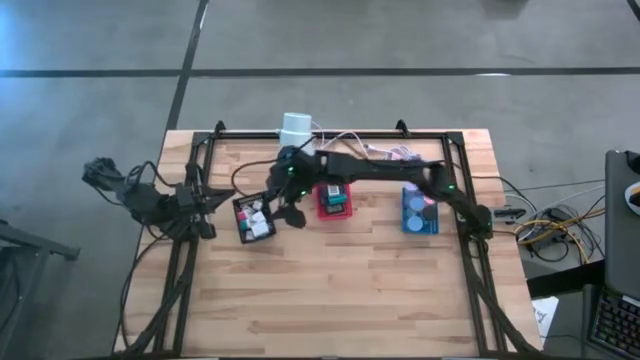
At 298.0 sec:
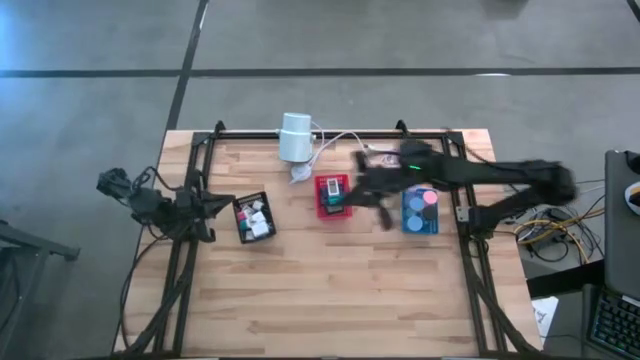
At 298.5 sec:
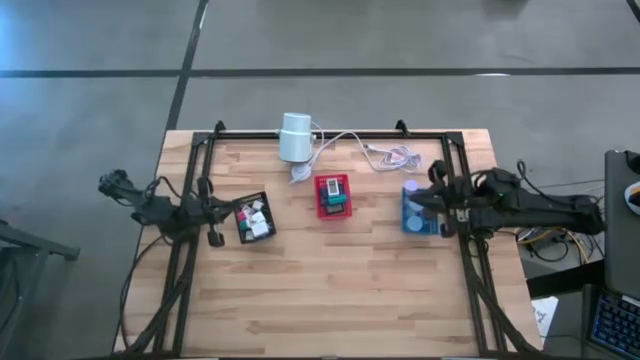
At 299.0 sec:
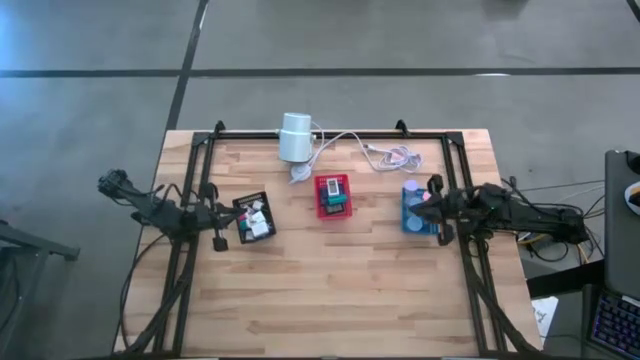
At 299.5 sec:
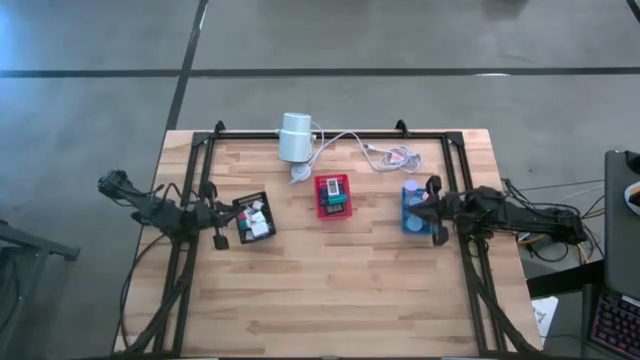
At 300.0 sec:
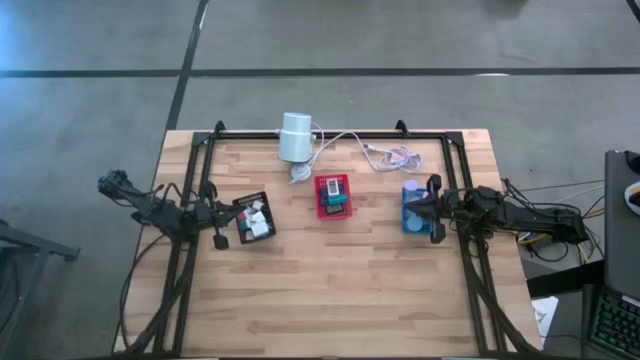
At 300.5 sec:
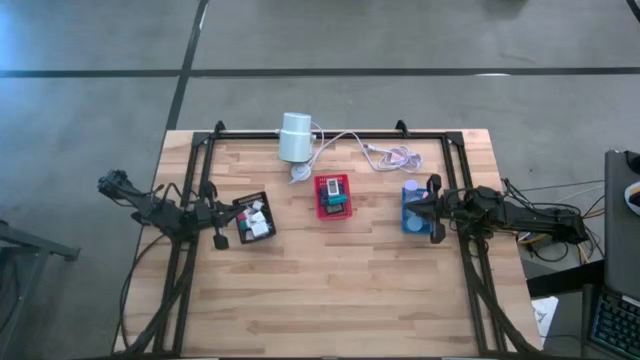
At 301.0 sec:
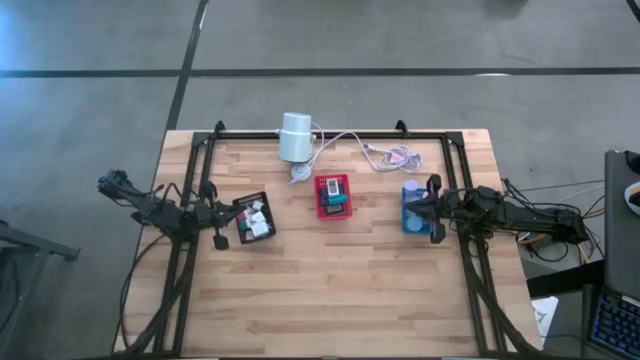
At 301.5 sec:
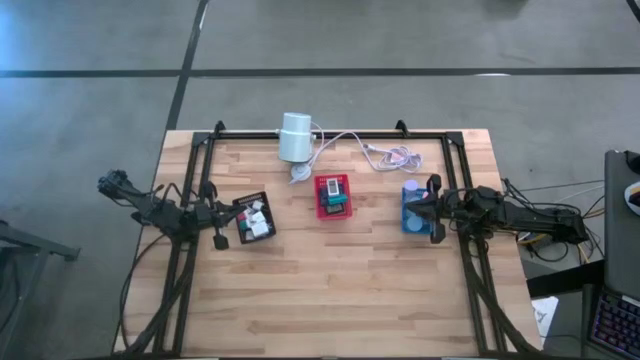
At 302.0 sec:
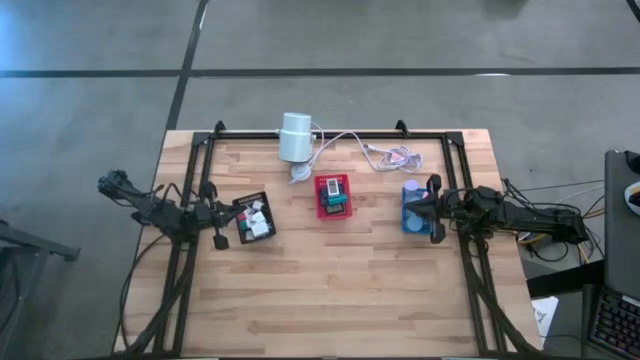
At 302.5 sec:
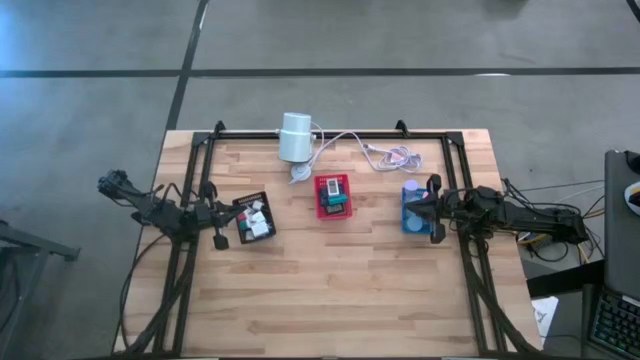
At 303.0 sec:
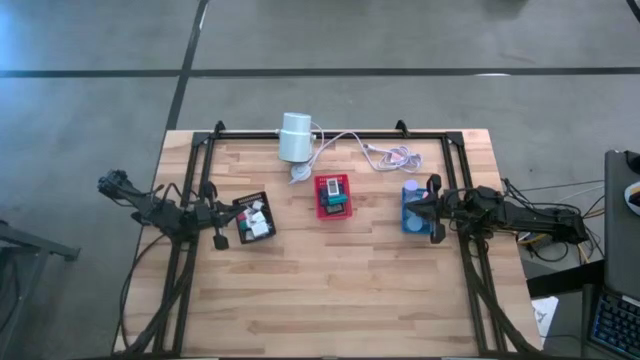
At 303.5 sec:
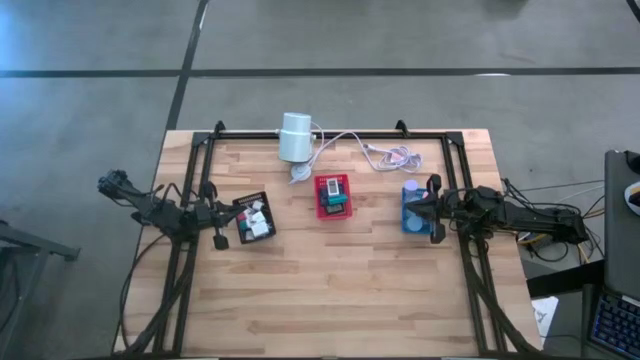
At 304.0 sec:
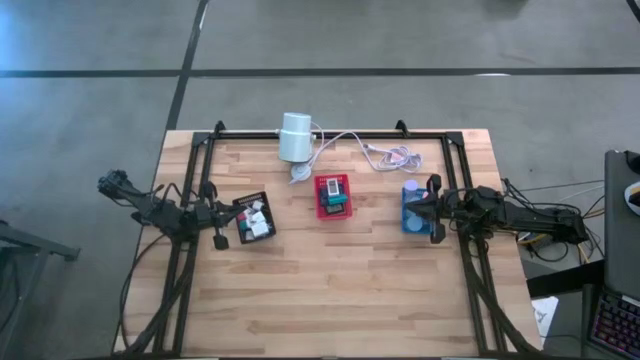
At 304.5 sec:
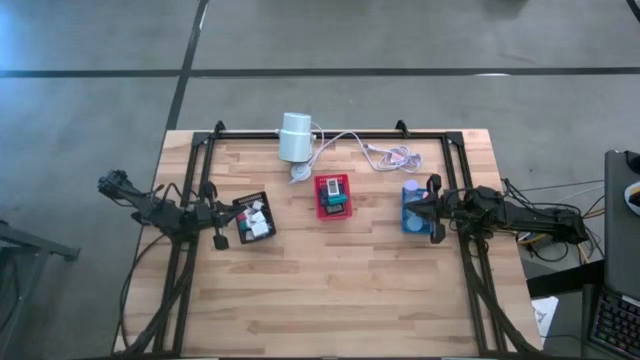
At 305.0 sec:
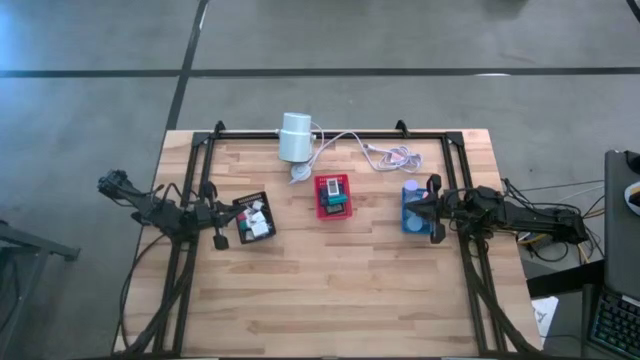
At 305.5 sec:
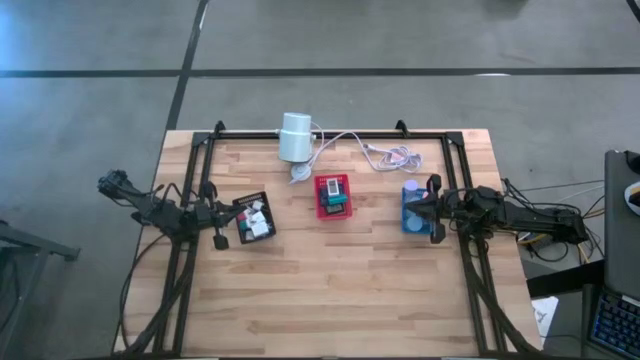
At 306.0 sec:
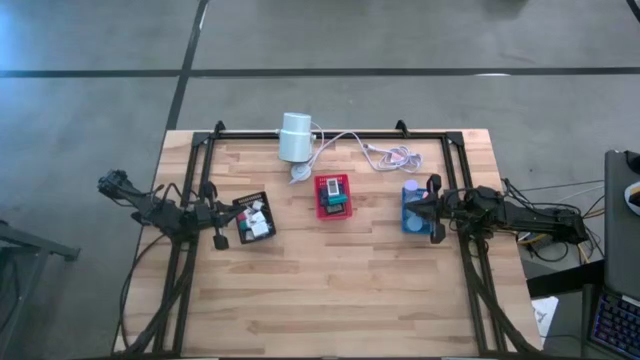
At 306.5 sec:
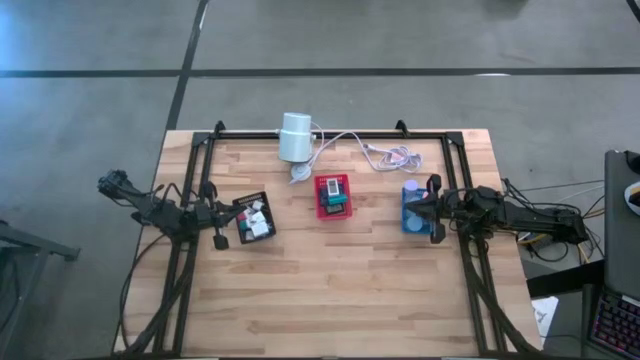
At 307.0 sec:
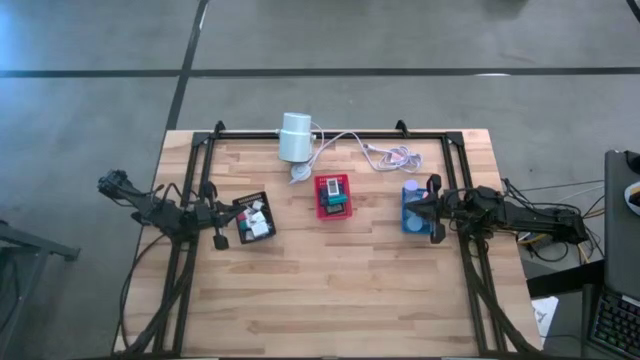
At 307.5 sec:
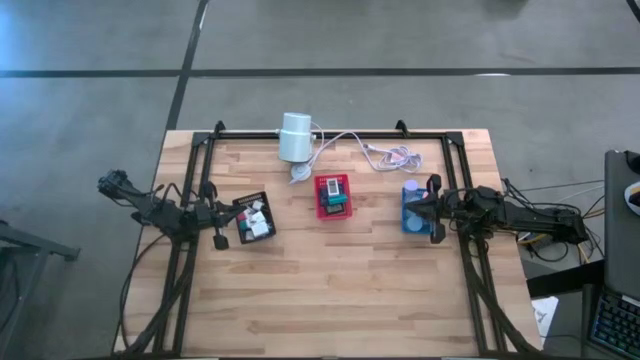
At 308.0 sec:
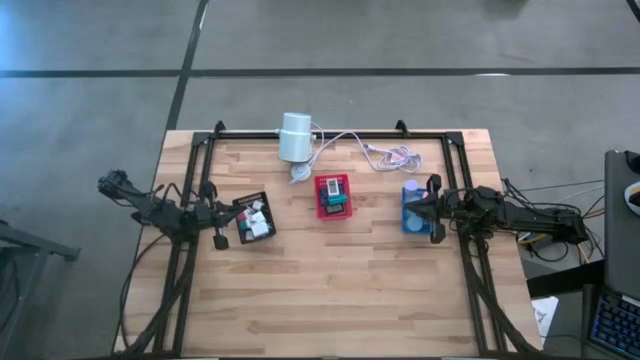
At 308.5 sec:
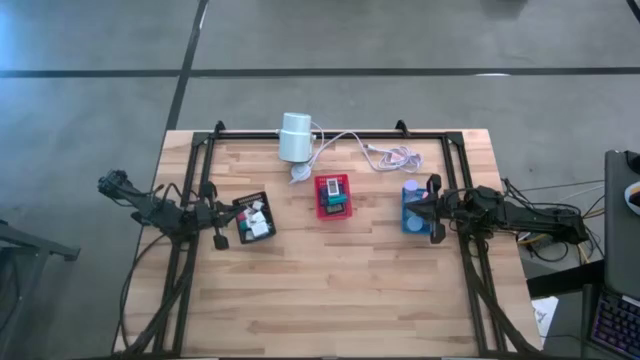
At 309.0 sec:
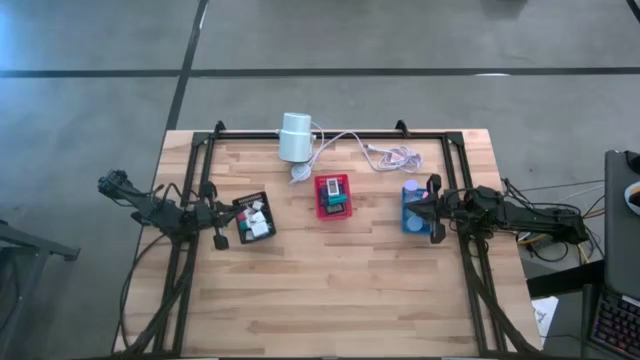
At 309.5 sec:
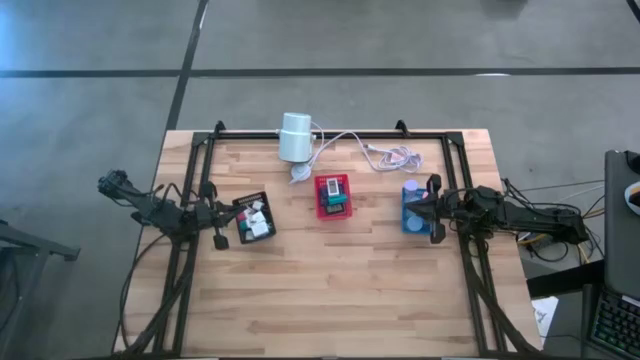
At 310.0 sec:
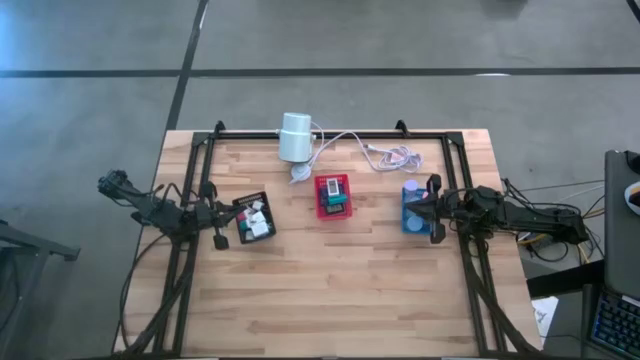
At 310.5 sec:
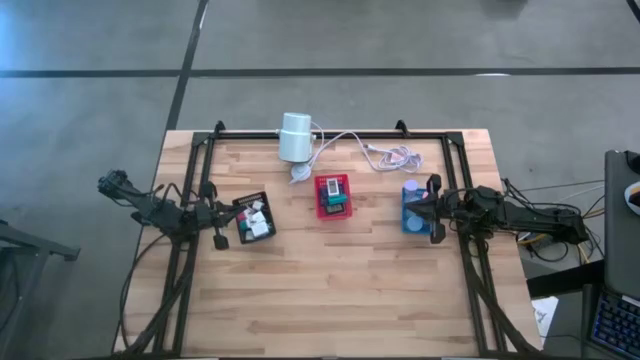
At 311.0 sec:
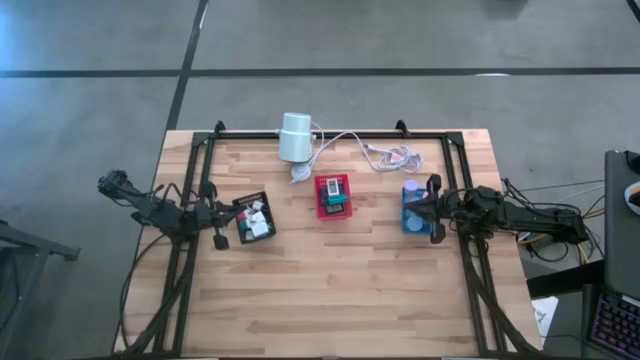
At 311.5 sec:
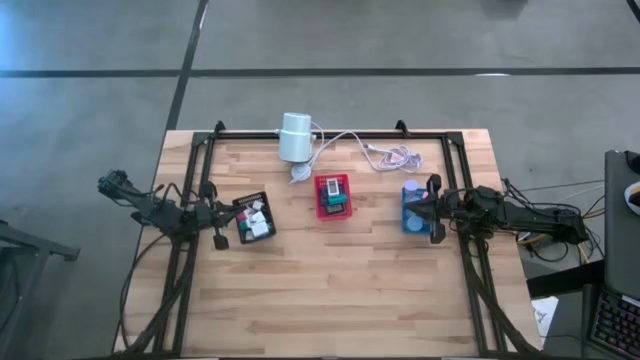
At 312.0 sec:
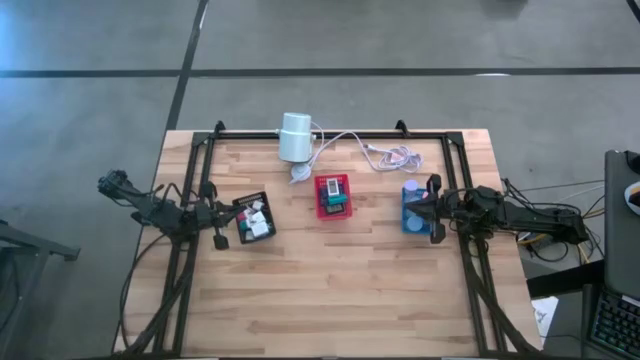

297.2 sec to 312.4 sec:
Task: Pick & Place Office items
Return to Home Position

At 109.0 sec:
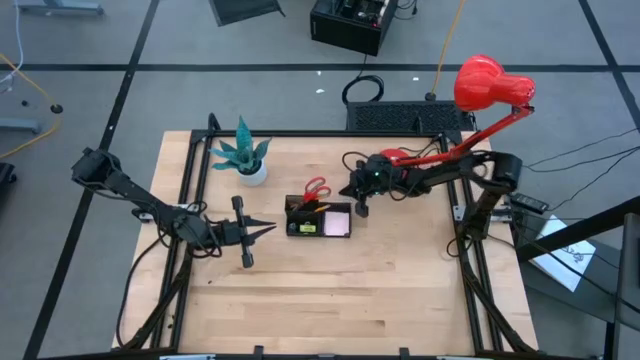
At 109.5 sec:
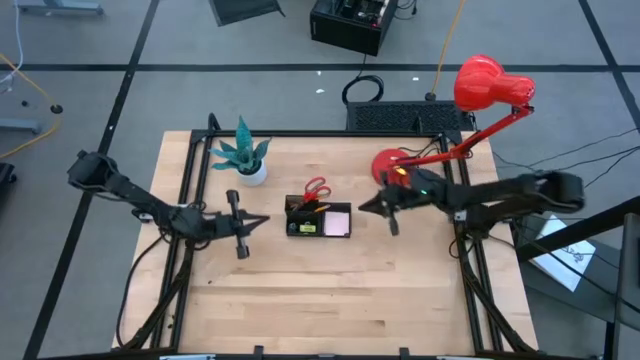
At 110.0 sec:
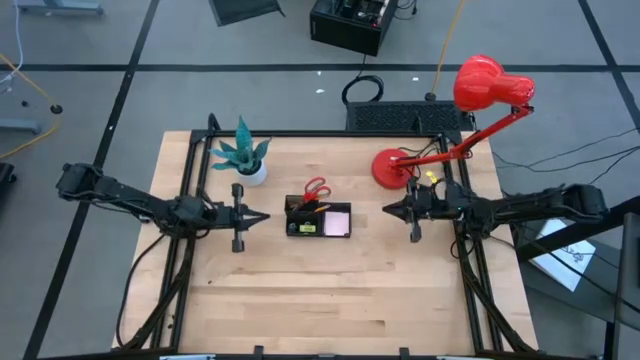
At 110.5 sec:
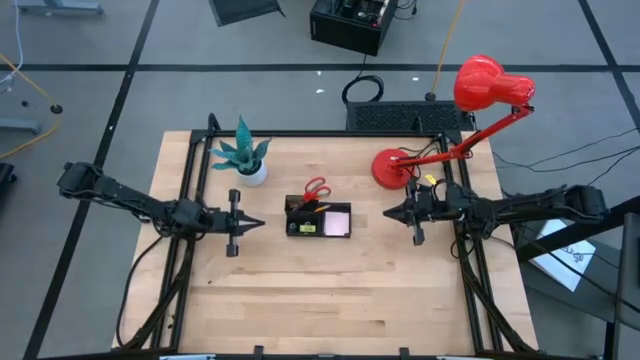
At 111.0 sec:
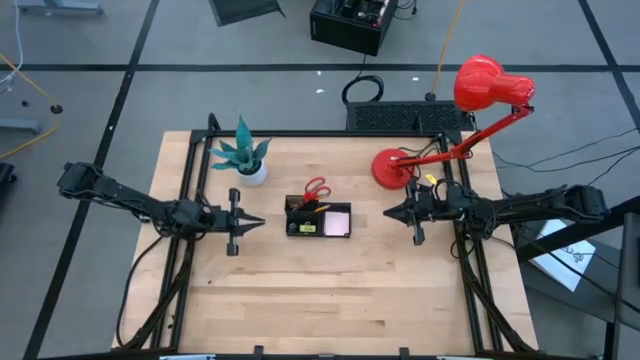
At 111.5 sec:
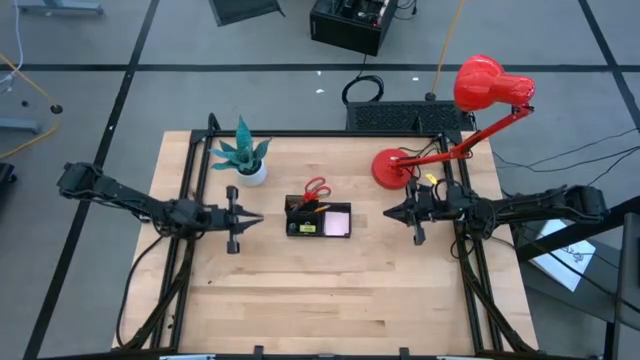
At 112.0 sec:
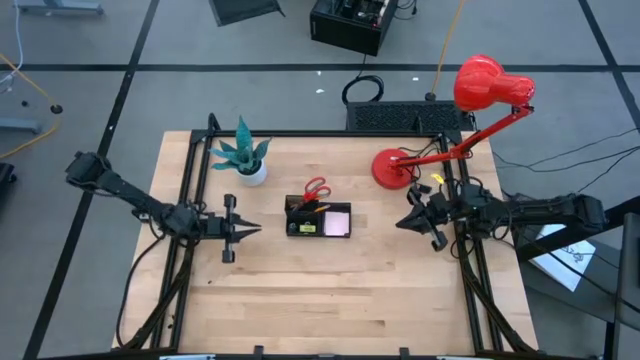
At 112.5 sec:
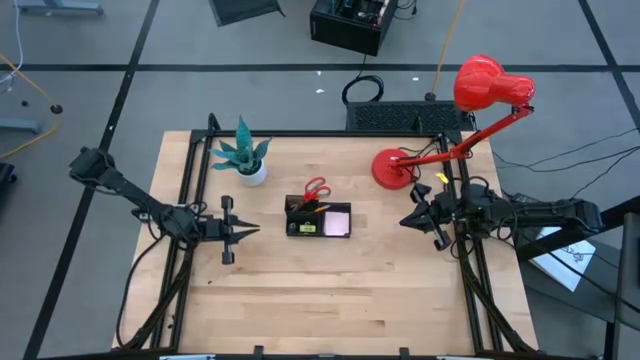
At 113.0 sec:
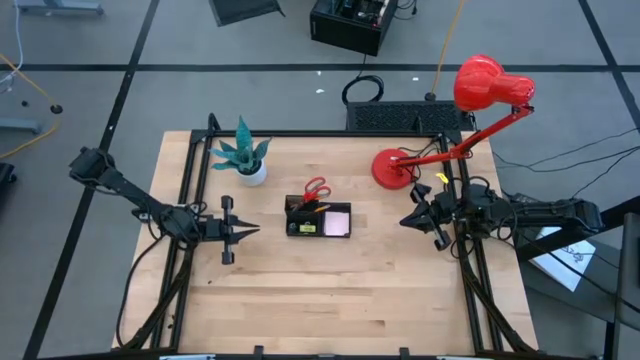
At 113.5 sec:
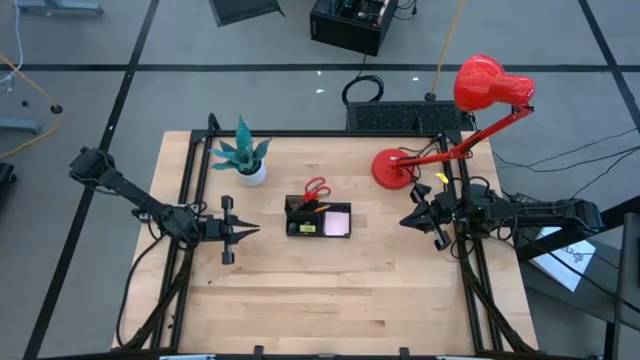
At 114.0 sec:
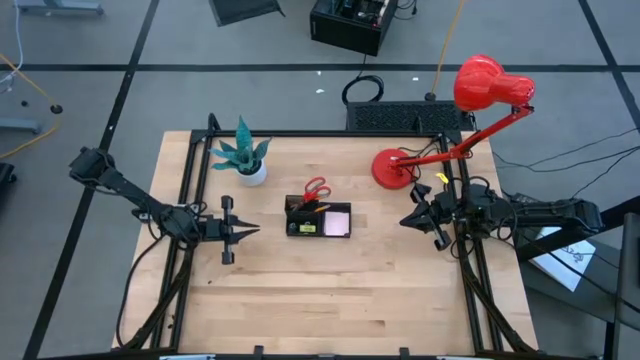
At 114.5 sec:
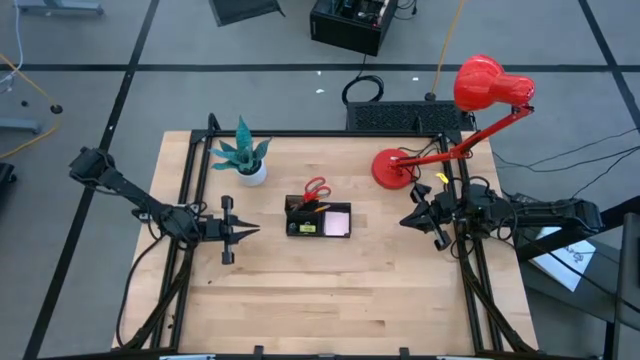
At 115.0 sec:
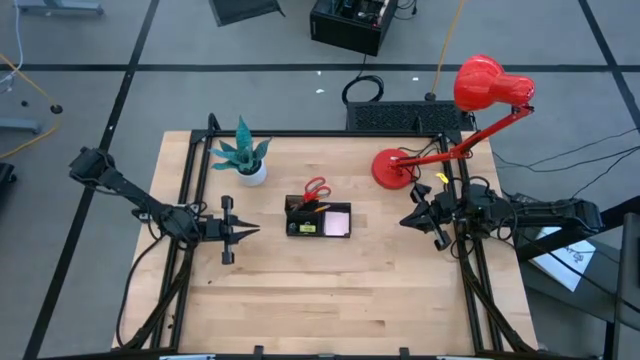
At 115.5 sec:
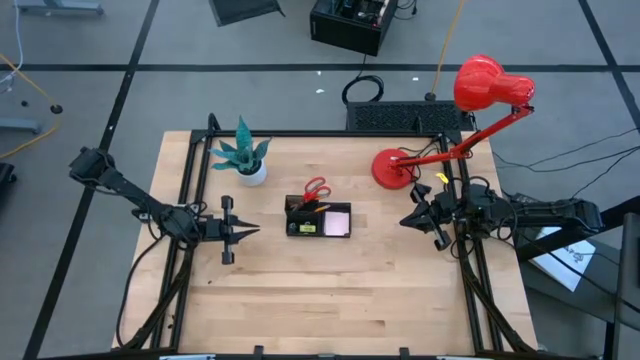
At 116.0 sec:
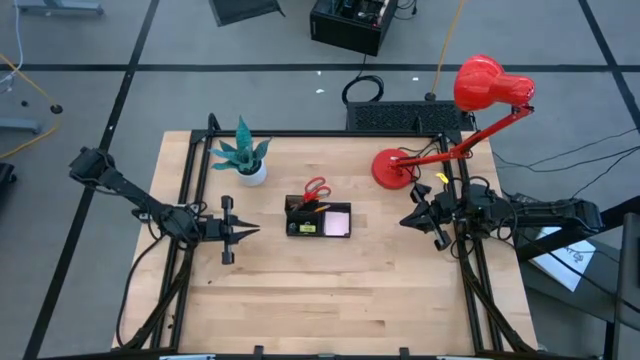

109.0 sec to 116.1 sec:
Task: Pick and place office supplies into organizer
Return to Home Position
